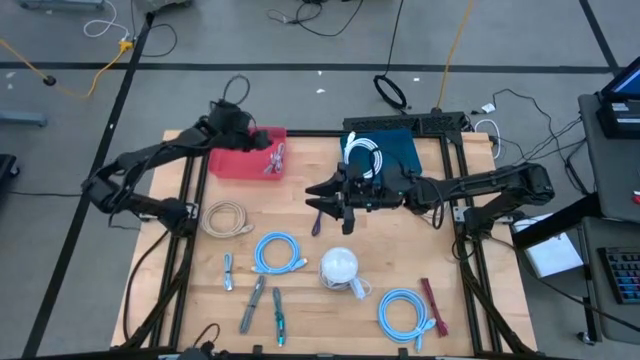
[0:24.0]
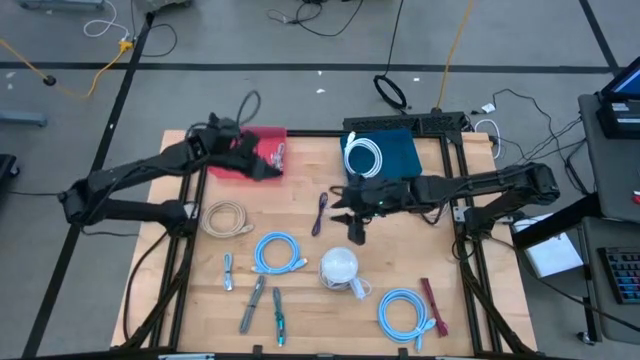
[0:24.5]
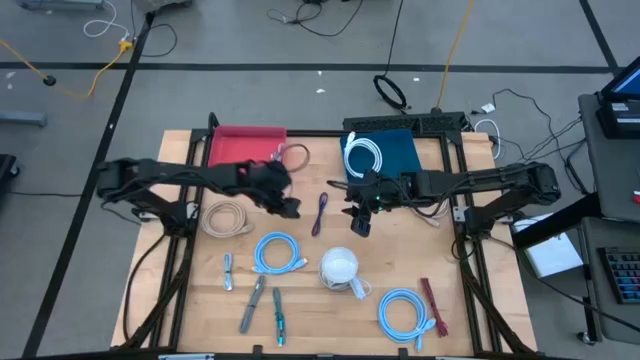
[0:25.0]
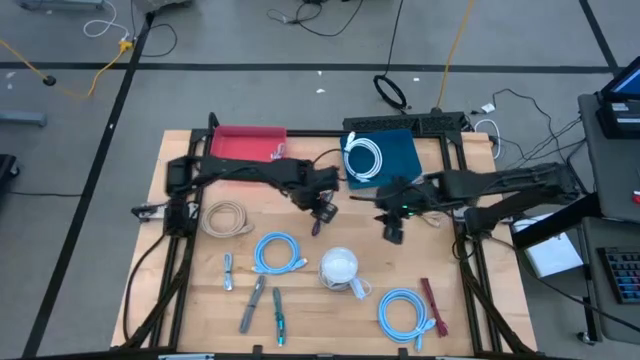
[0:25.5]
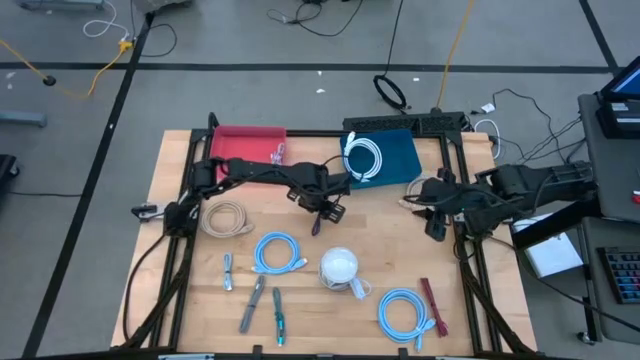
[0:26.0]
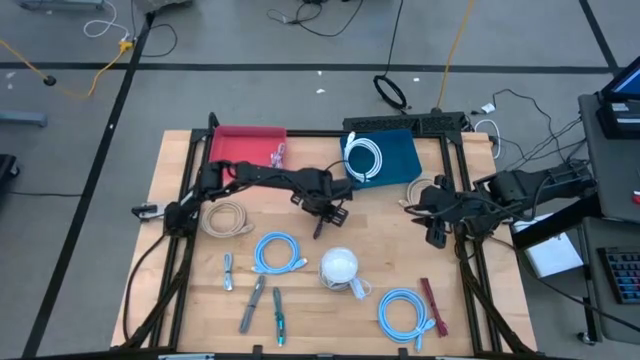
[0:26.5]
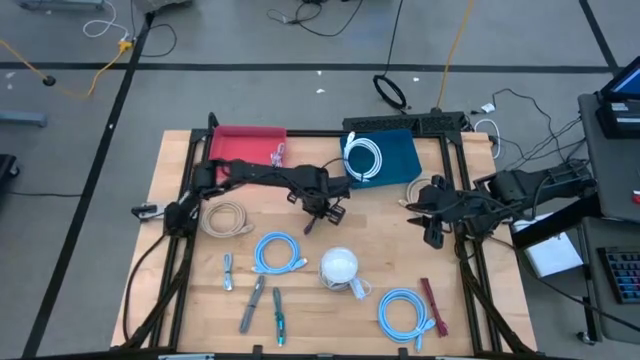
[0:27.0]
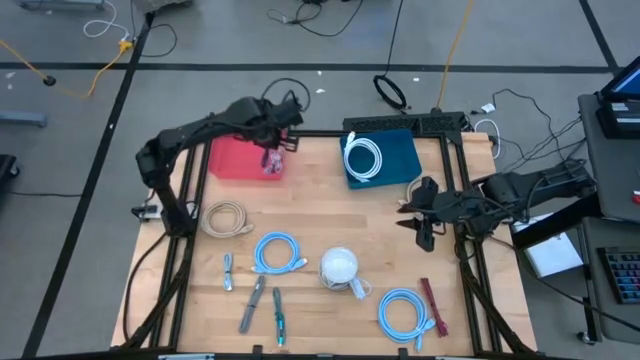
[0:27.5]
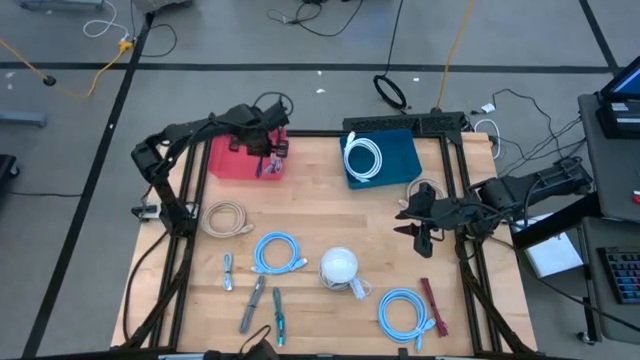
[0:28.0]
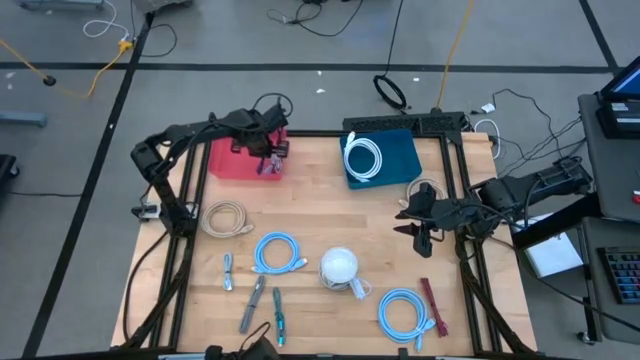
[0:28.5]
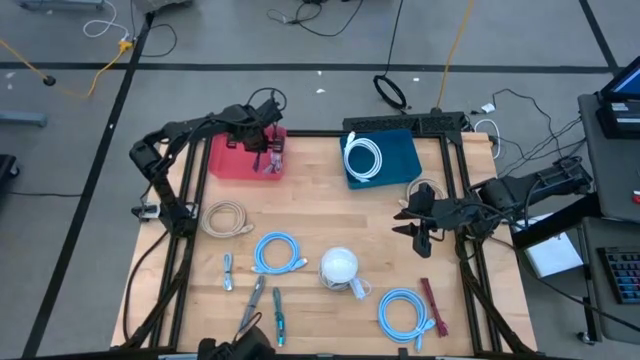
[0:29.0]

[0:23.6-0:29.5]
Task: Pick & Place USB Port
Put the violet USB cable into the pink bin

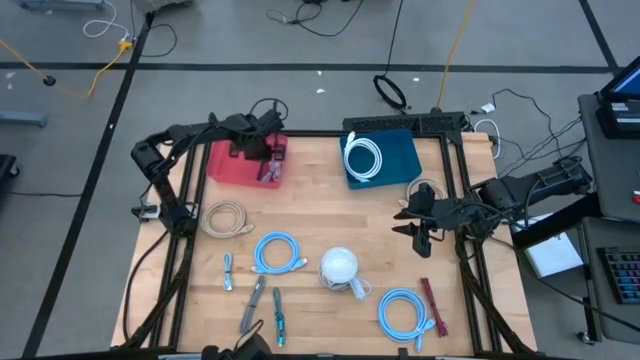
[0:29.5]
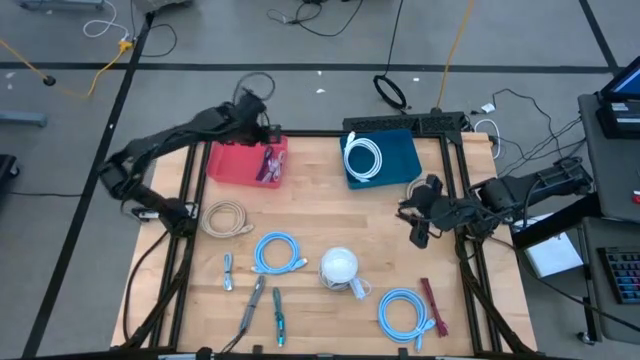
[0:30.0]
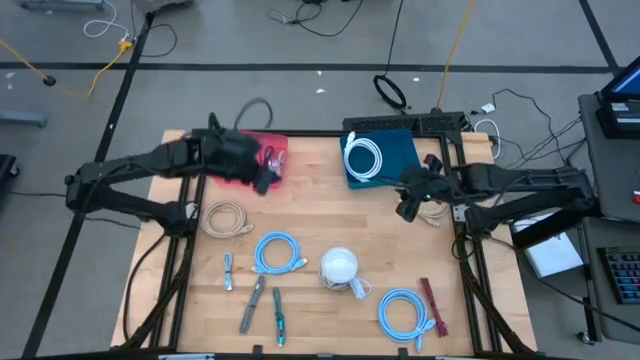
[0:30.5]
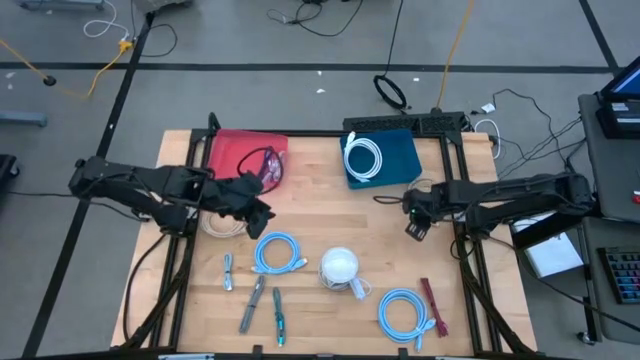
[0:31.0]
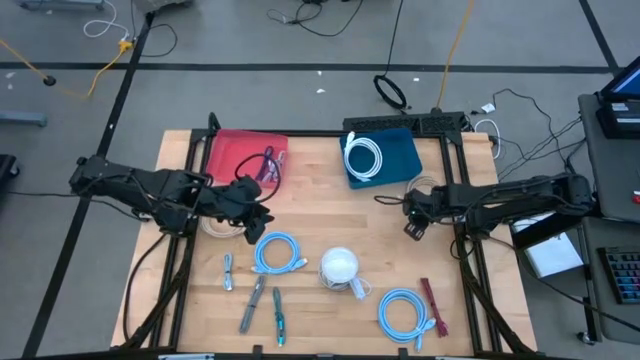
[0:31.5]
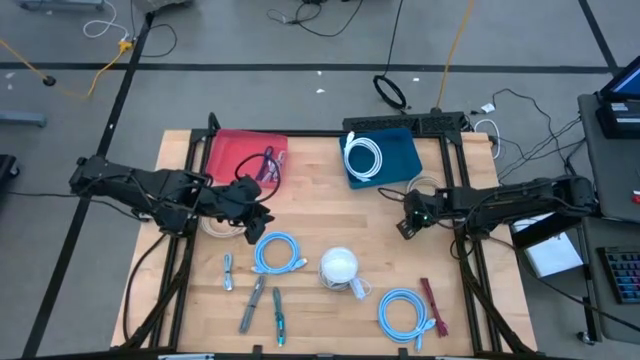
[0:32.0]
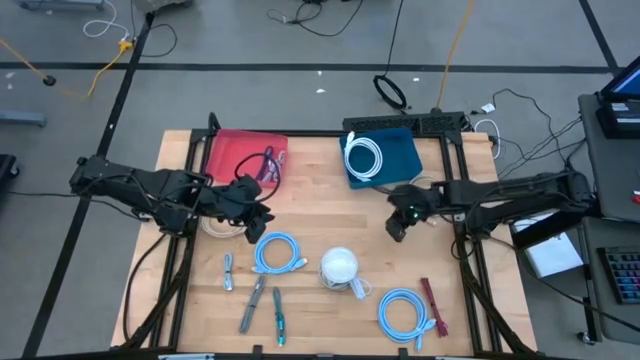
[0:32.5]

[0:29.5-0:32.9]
Put the right light brown USB cable into the blue bin

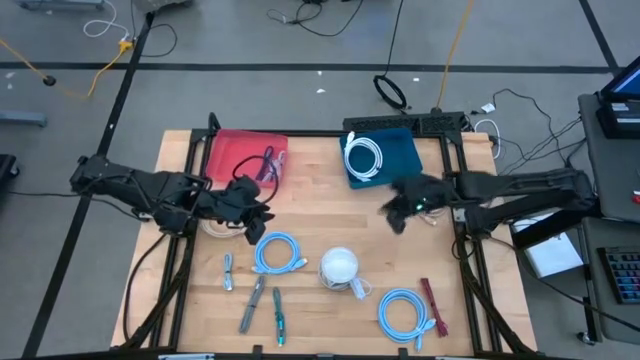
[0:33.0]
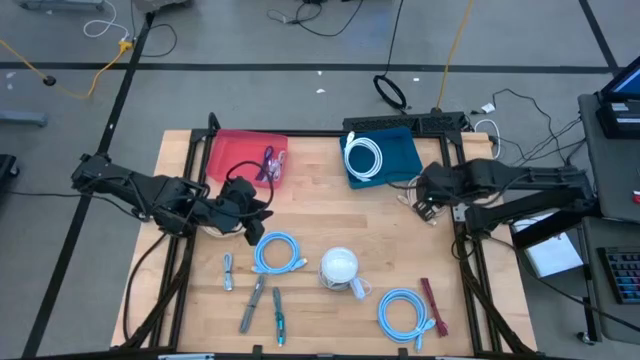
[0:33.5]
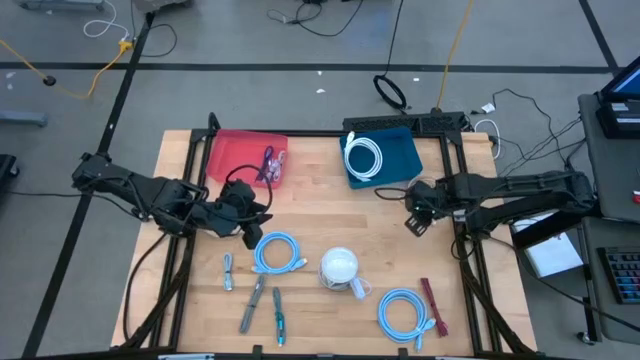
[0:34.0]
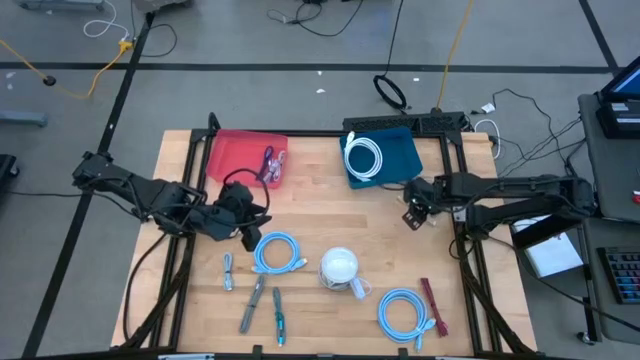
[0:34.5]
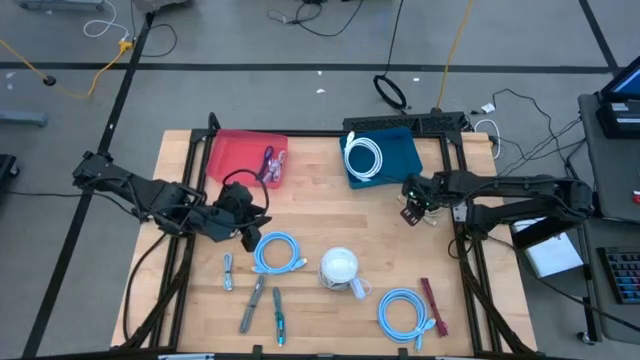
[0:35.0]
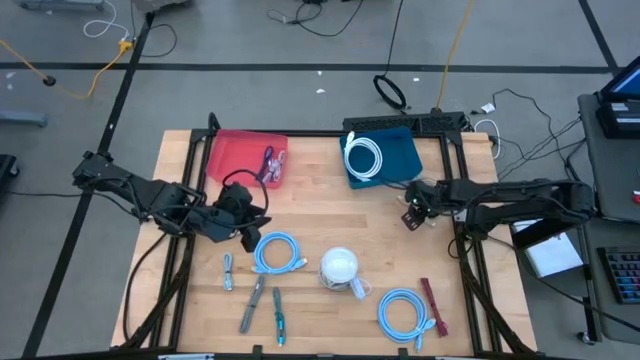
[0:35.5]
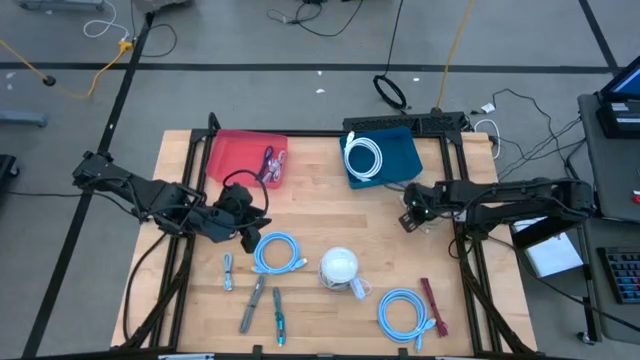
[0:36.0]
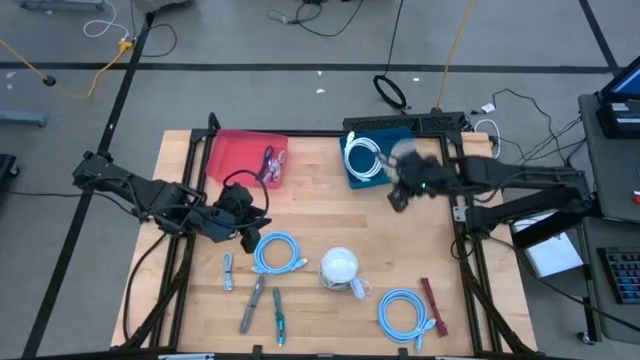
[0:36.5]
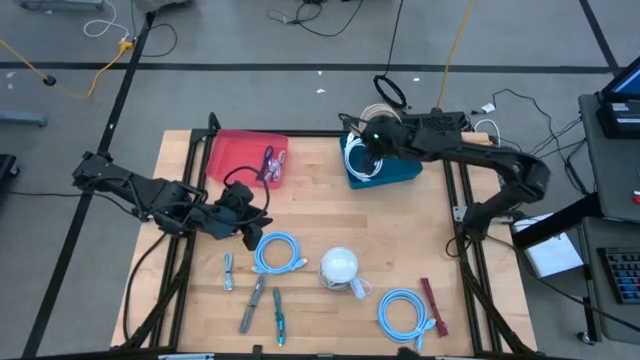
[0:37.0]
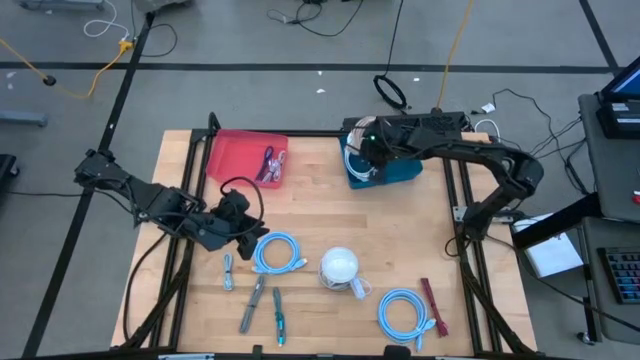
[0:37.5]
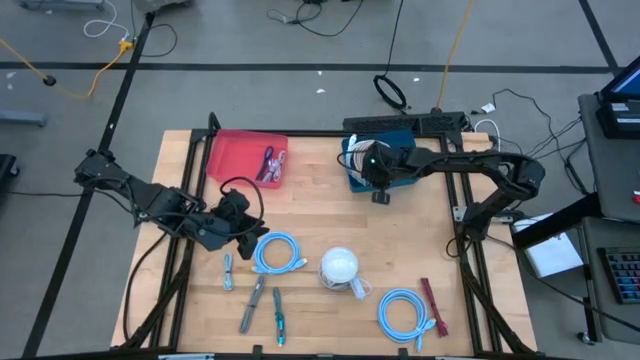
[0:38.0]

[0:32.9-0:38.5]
Put the right light brown USB cable into the blue bin

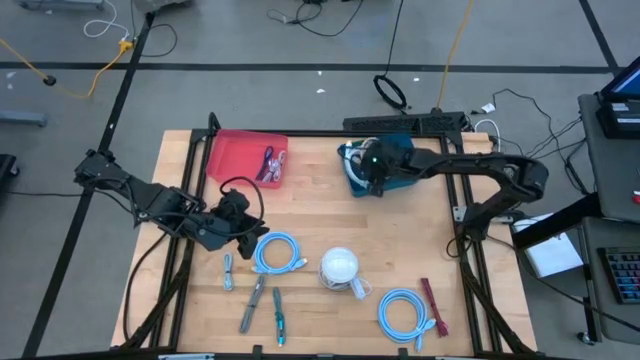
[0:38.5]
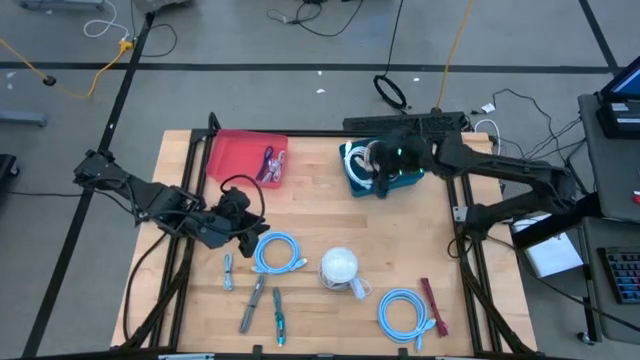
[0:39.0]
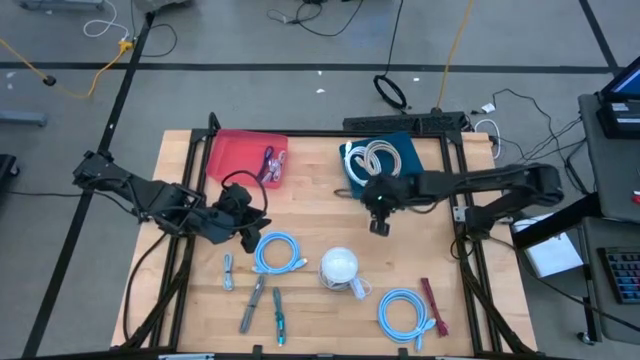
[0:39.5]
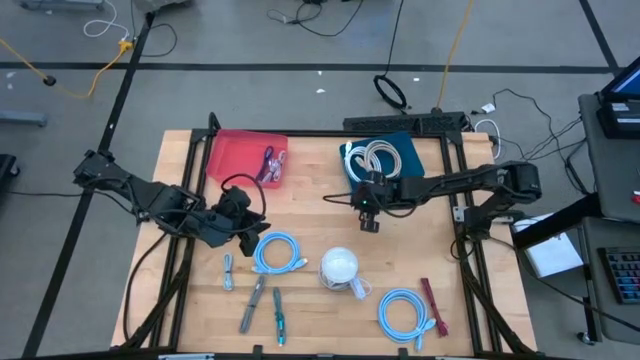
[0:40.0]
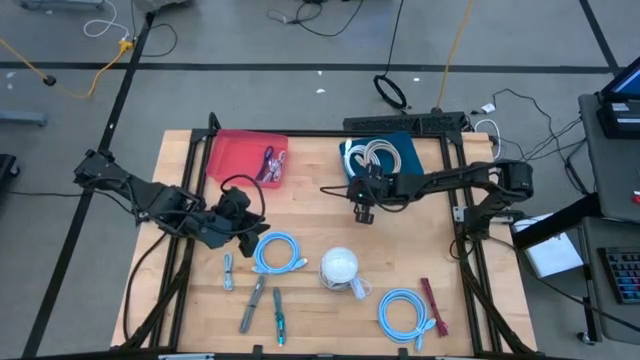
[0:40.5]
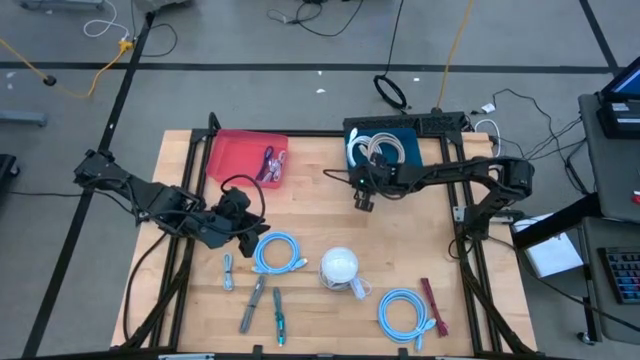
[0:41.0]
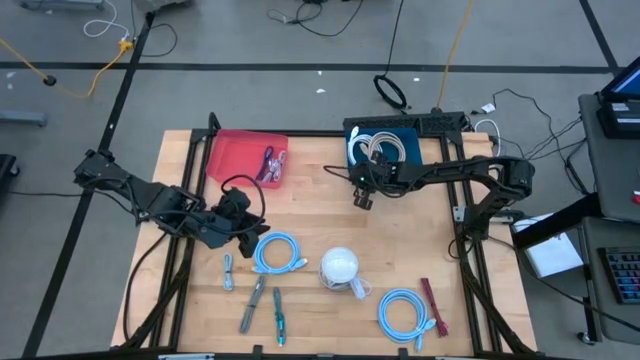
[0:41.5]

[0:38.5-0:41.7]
Adjust the blue bin

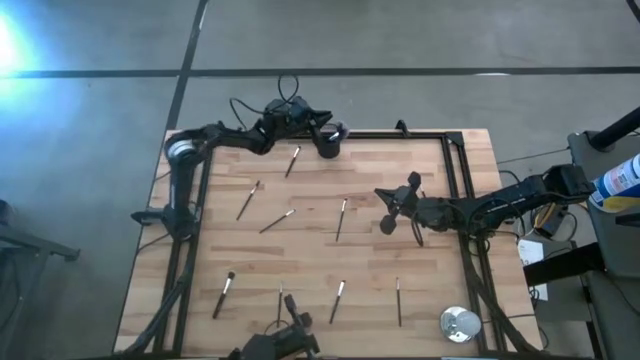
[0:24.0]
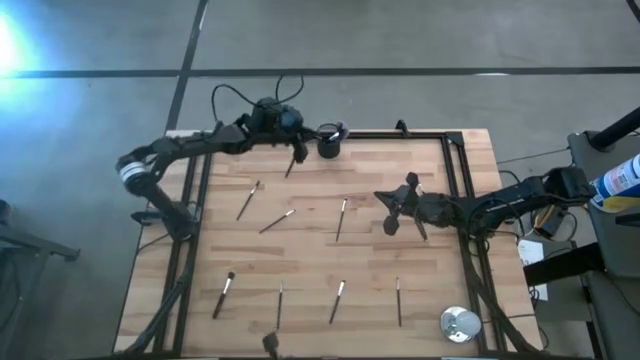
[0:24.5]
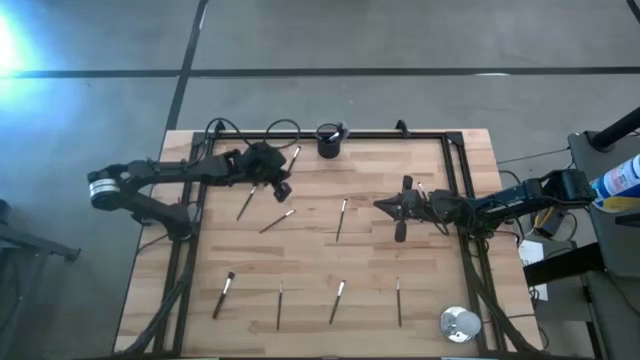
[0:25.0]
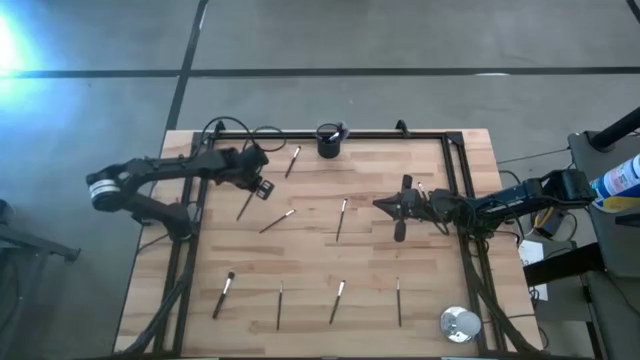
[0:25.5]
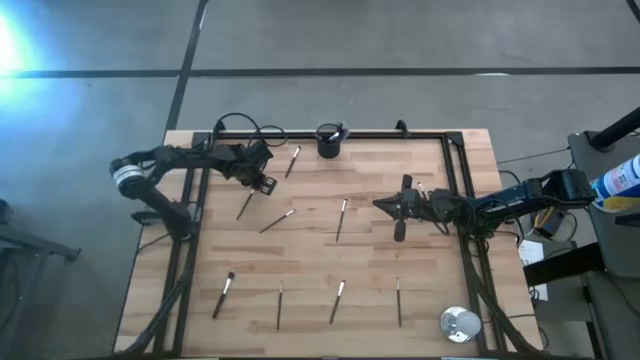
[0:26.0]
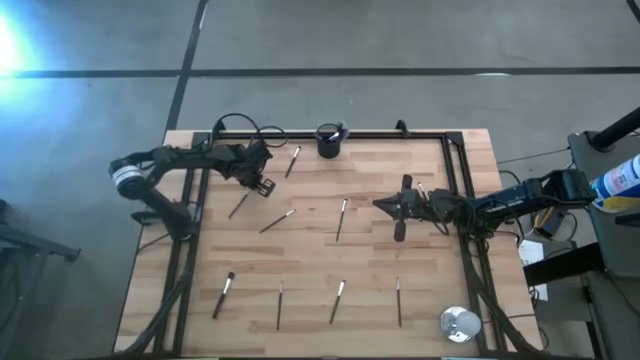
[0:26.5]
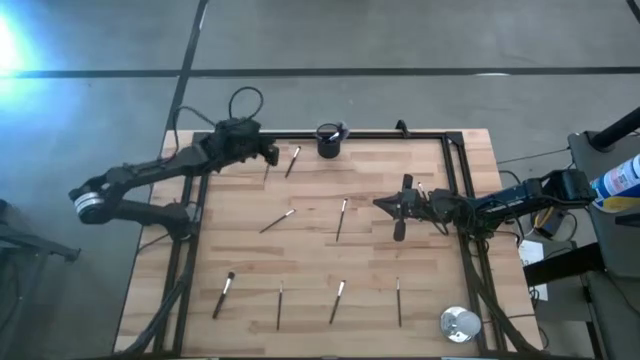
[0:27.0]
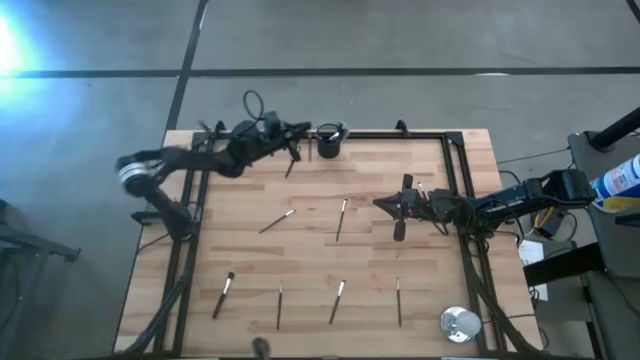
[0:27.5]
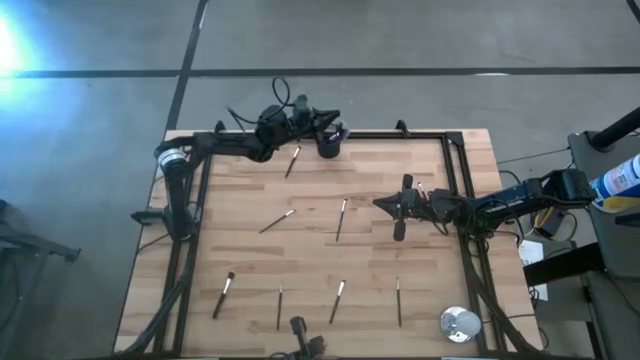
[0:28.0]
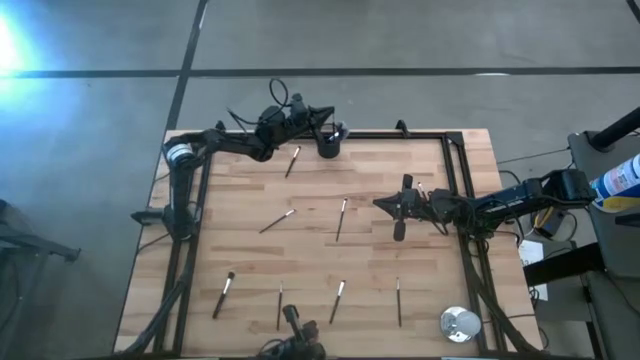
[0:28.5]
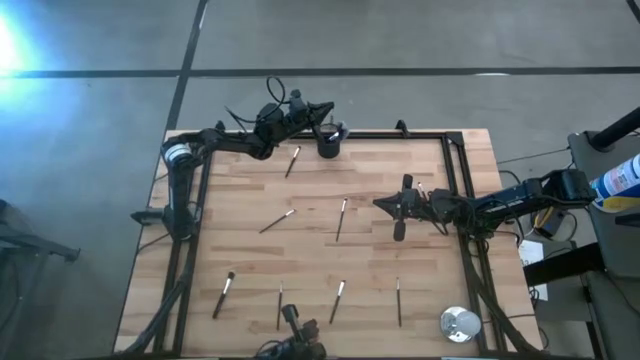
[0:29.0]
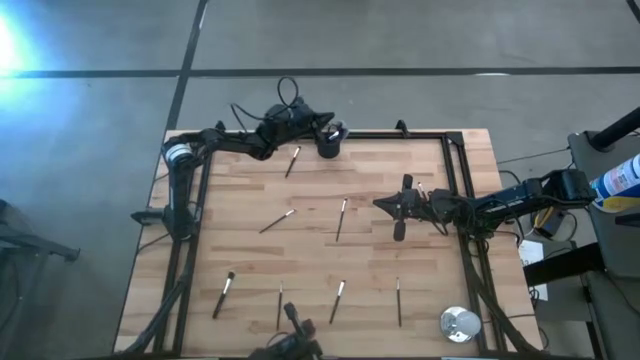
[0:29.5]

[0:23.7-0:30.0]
Task: Put items in baskets/containers
Put the black lash brush into the black pen holder
